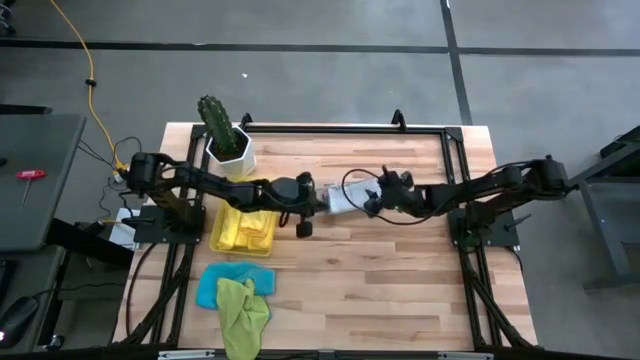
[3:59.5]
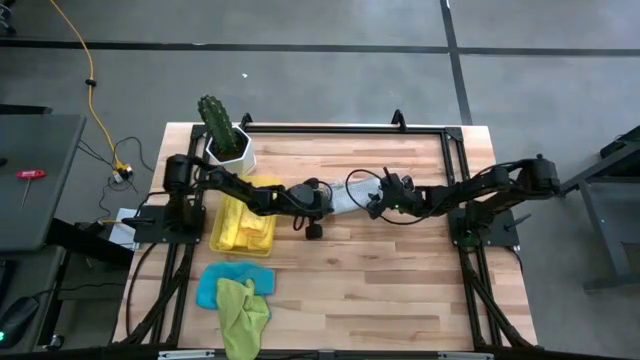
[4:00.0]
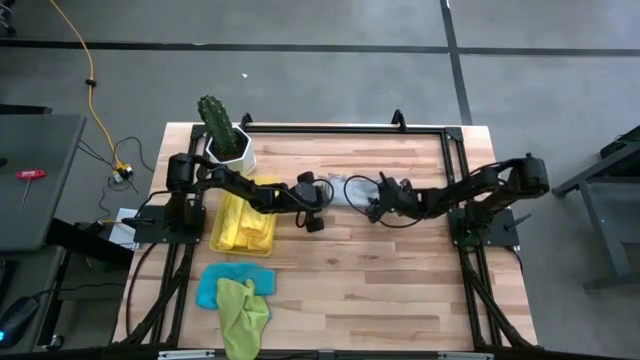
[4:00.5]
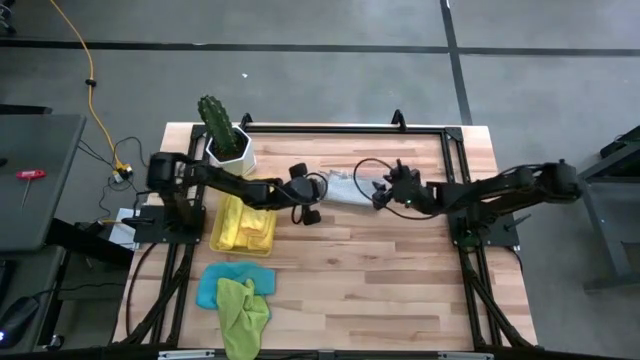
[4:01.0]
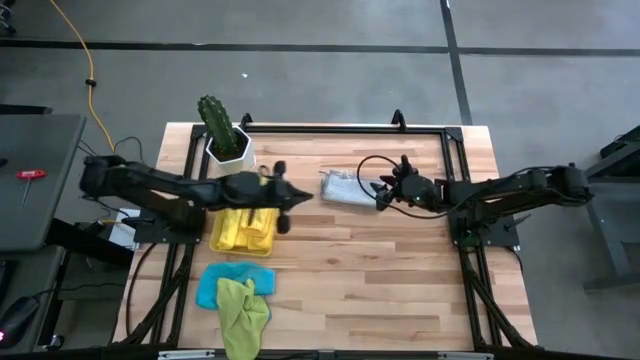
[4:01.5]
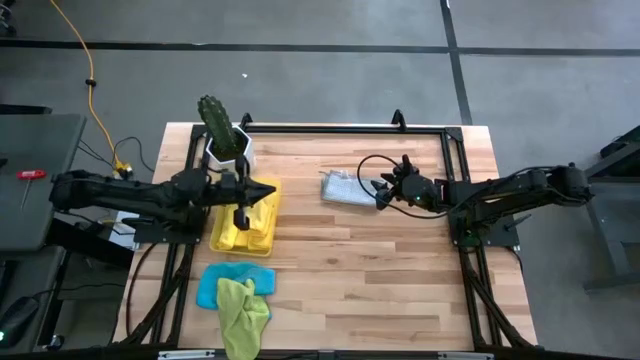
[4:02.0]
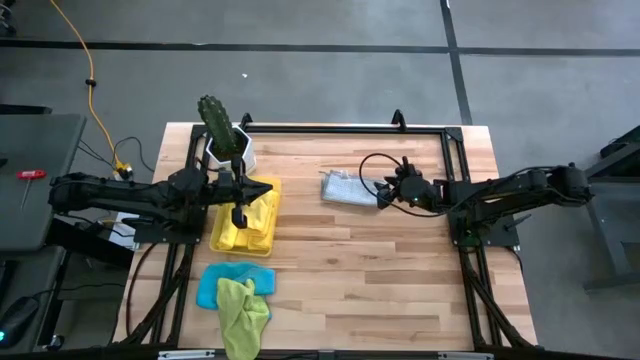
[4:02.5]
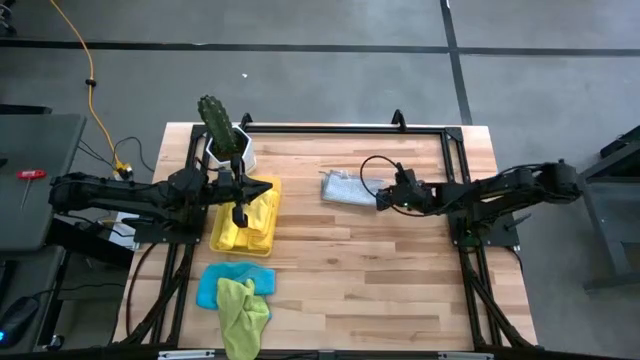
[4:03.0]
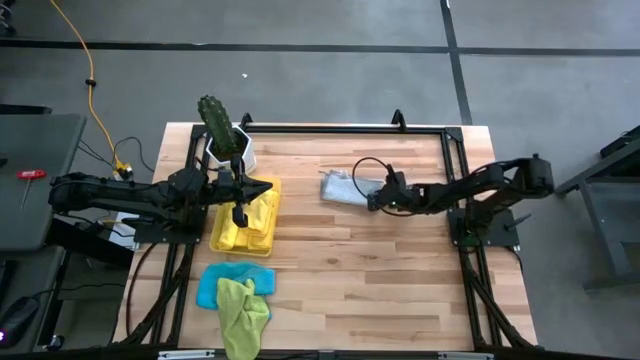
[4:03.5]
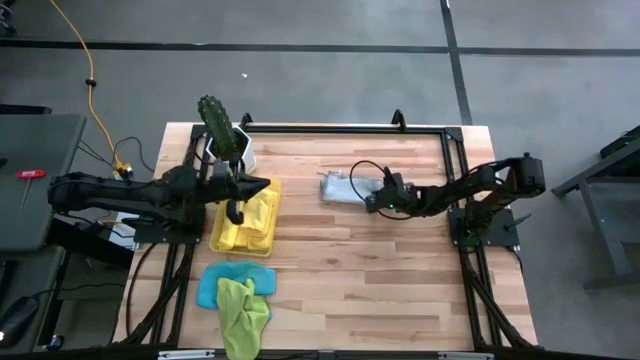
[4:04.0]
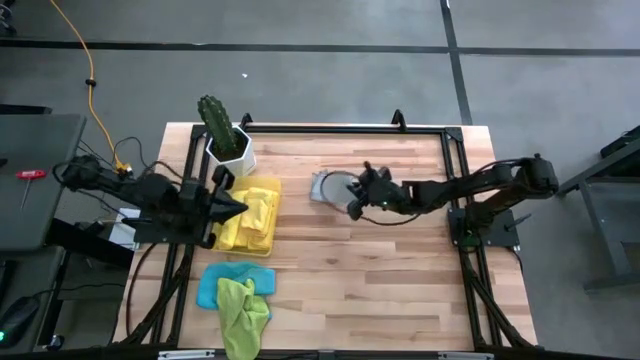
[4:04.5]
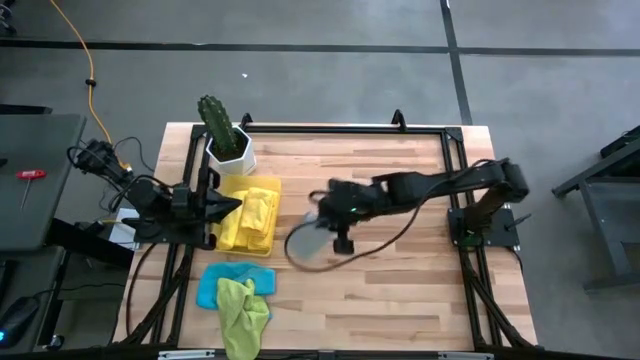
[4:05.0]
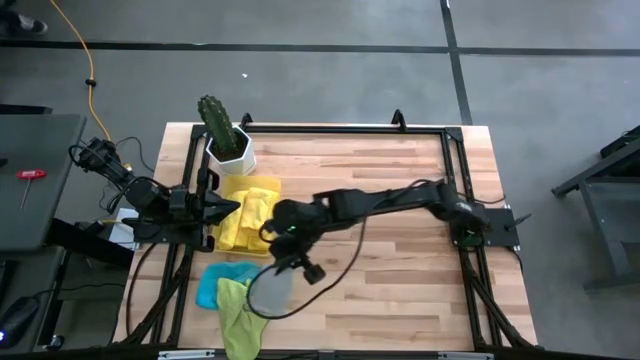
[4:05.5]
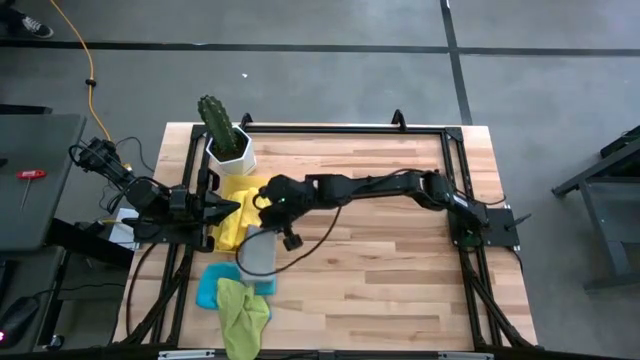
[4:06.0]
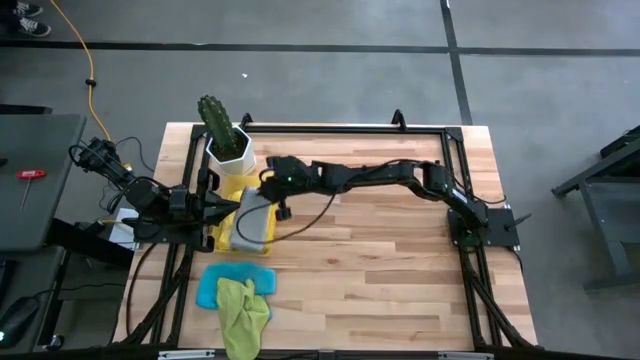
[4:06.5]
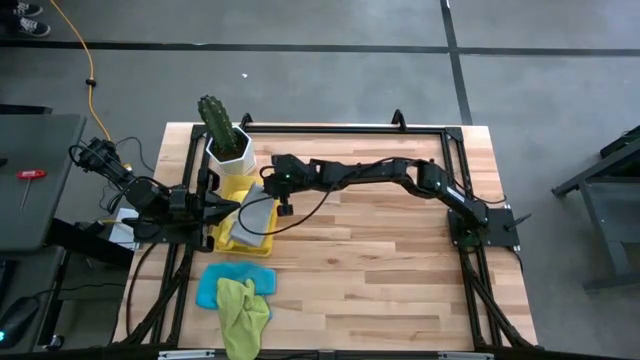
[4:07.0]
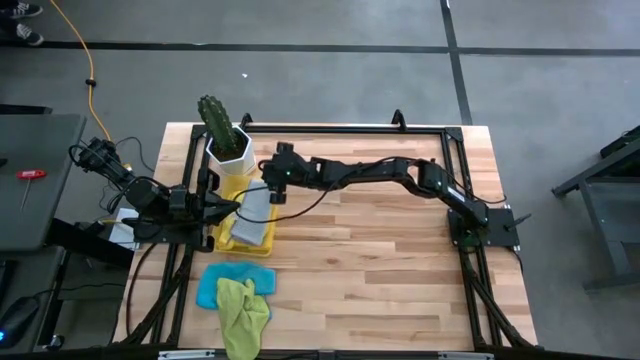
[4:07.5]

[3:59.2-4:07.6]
Task: Fold microfiber towels
Put the folded gray microfiber towel into the yellow bin

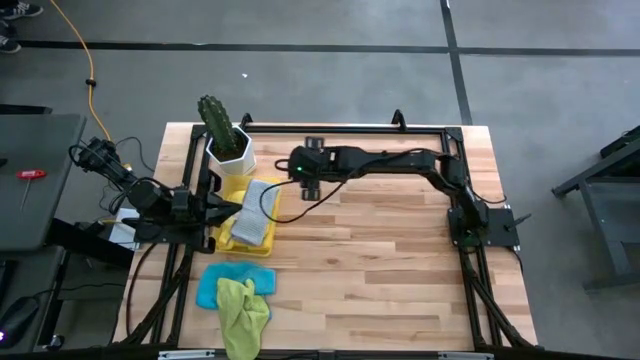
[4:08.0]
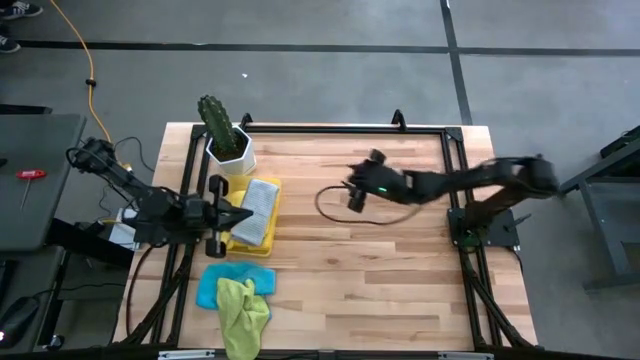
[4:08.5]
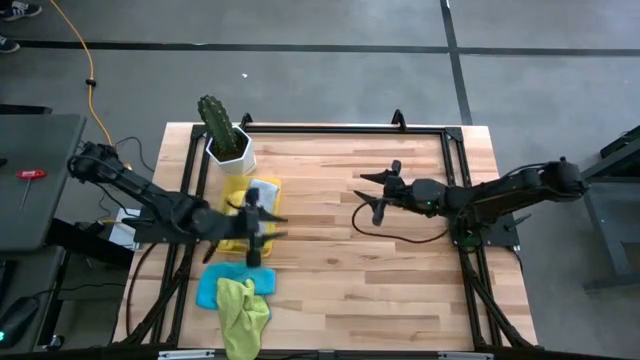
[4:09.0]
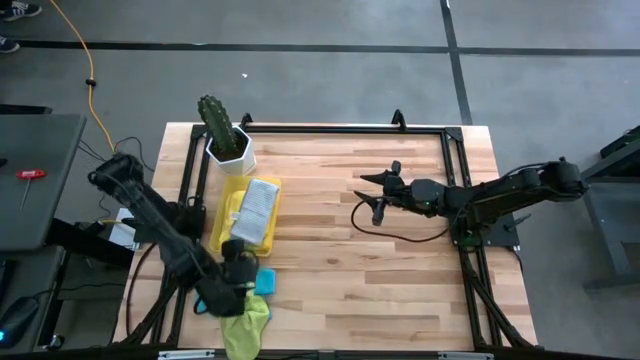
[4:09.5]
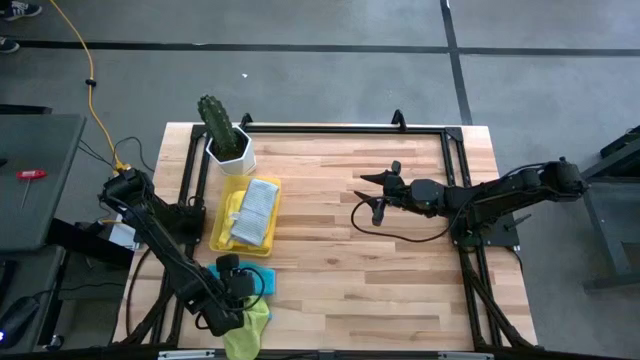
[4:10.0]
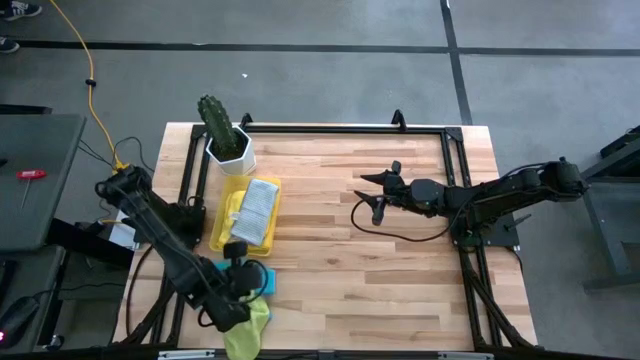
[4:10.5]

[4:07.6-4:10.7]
Fold the green microfiber towel

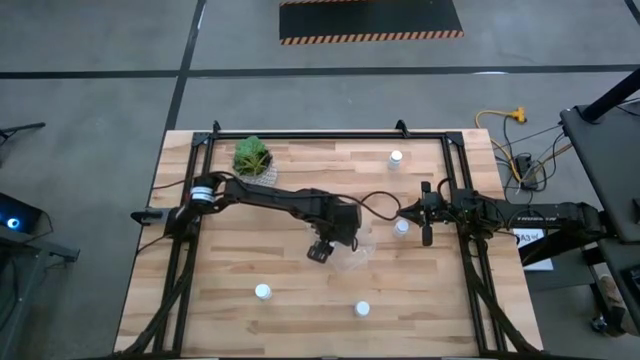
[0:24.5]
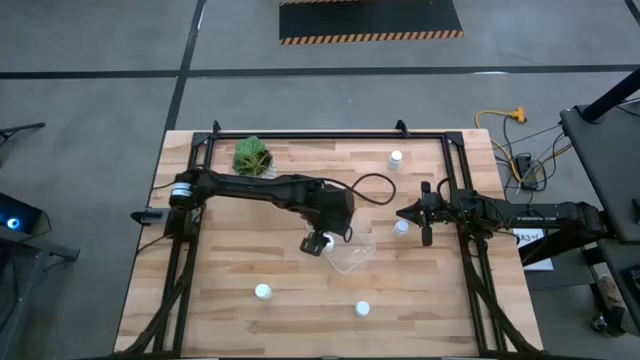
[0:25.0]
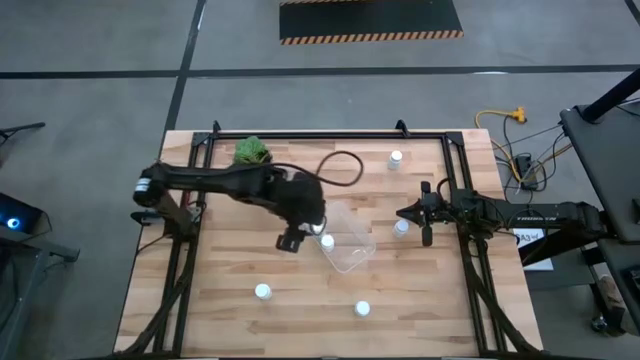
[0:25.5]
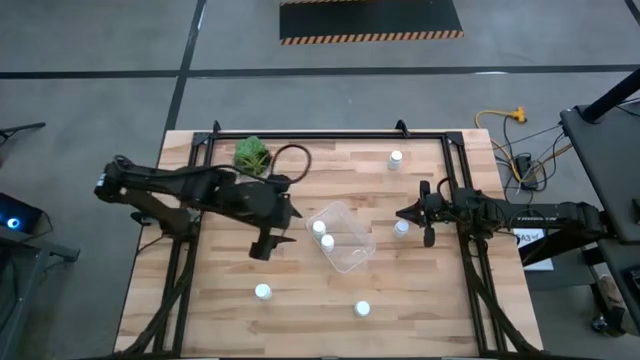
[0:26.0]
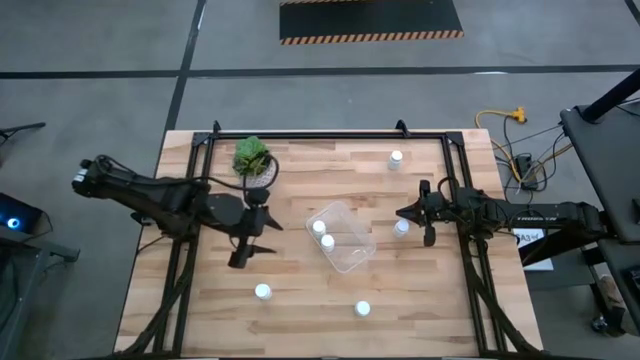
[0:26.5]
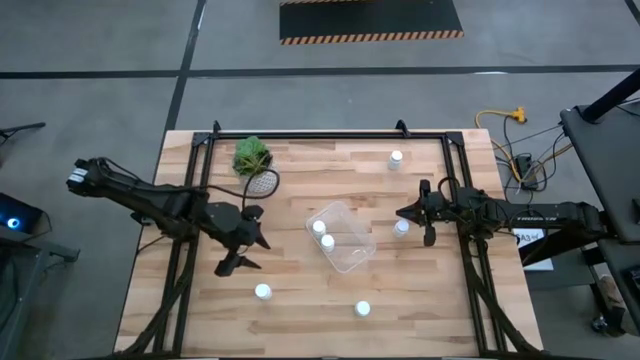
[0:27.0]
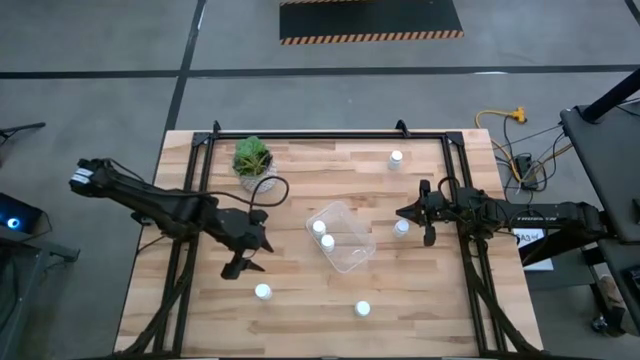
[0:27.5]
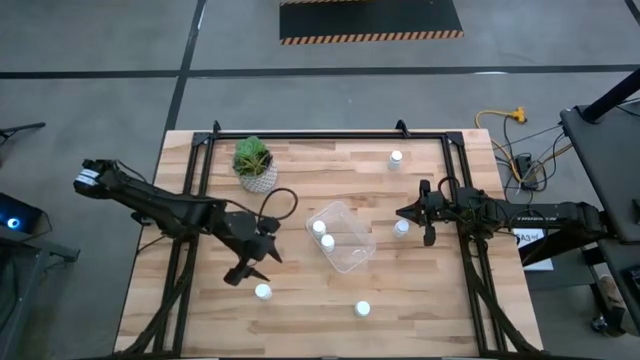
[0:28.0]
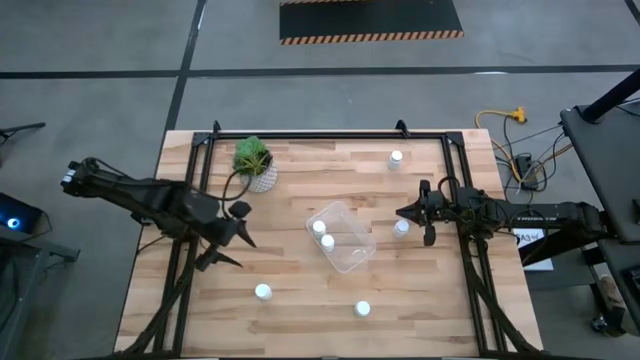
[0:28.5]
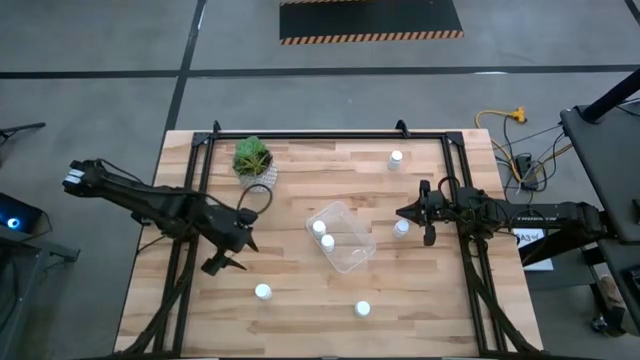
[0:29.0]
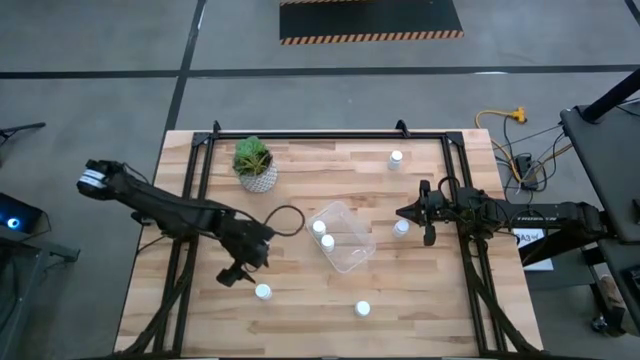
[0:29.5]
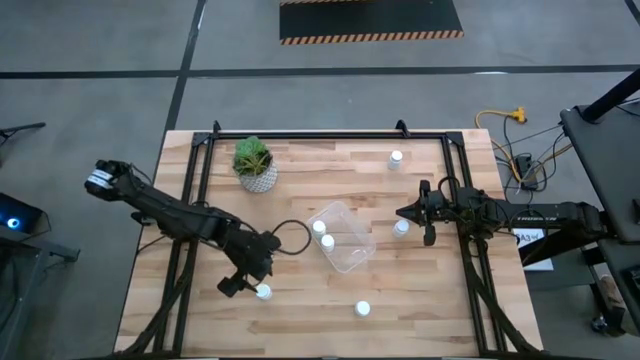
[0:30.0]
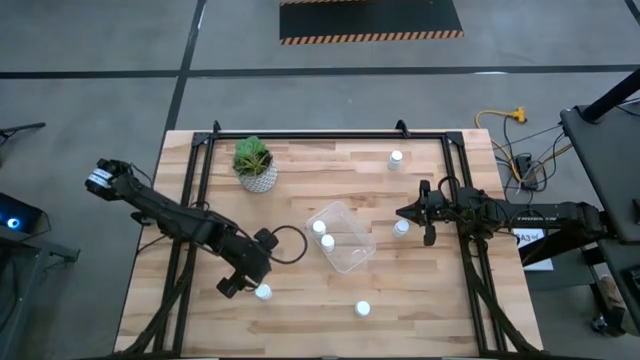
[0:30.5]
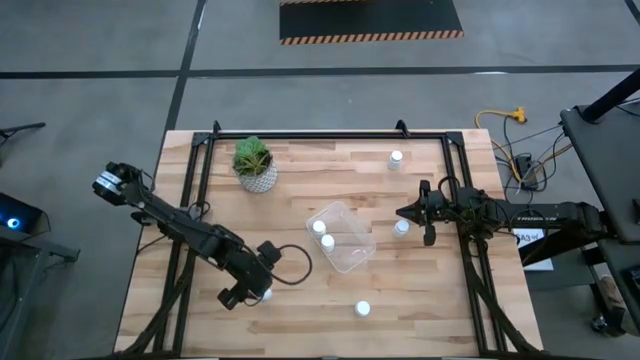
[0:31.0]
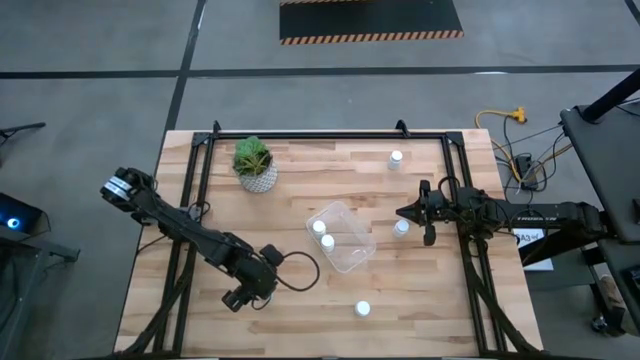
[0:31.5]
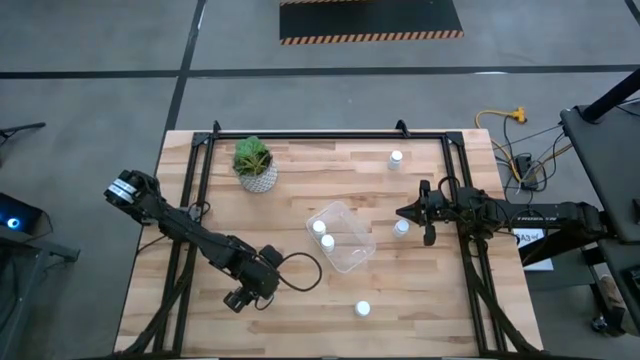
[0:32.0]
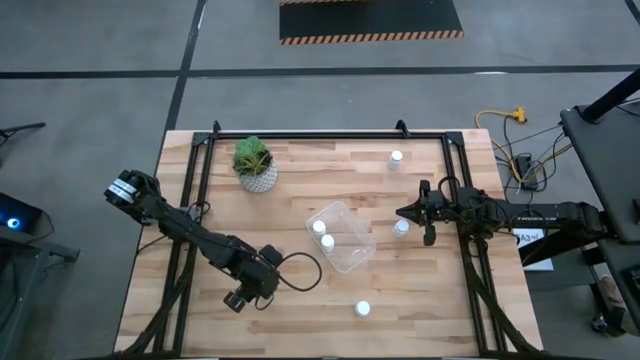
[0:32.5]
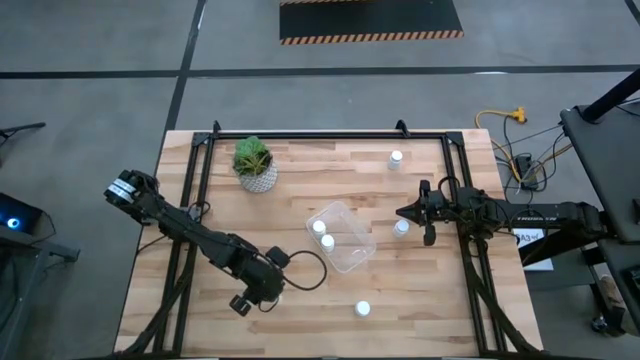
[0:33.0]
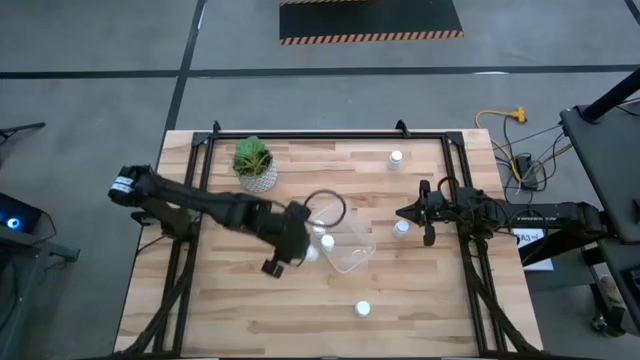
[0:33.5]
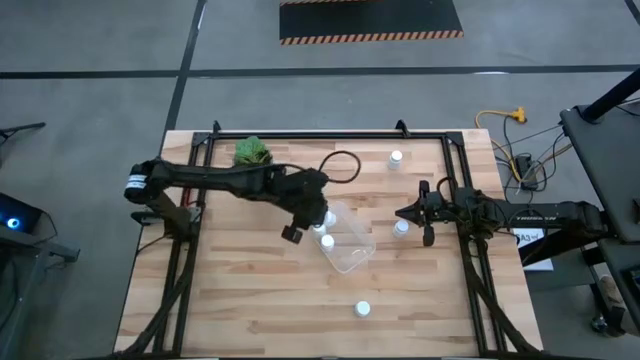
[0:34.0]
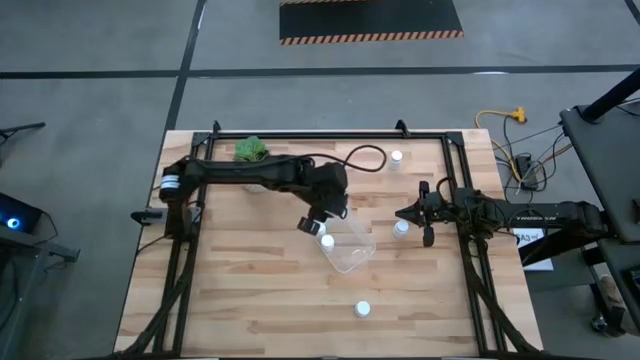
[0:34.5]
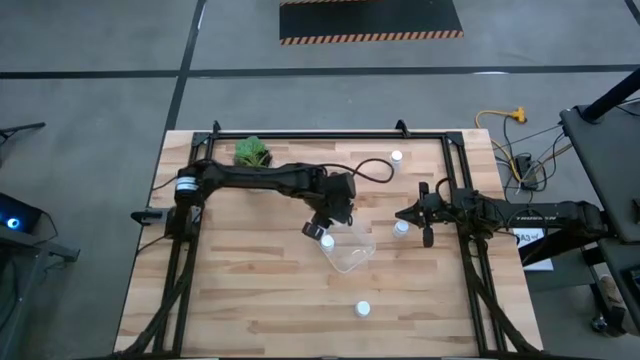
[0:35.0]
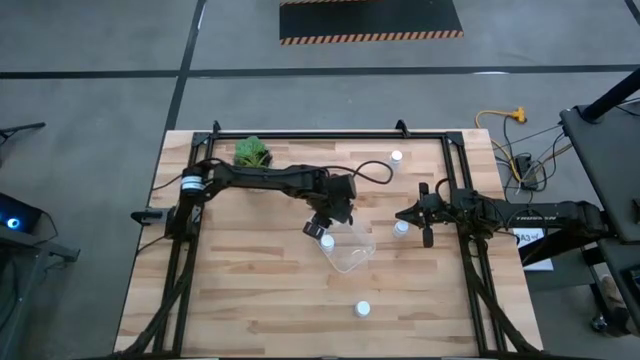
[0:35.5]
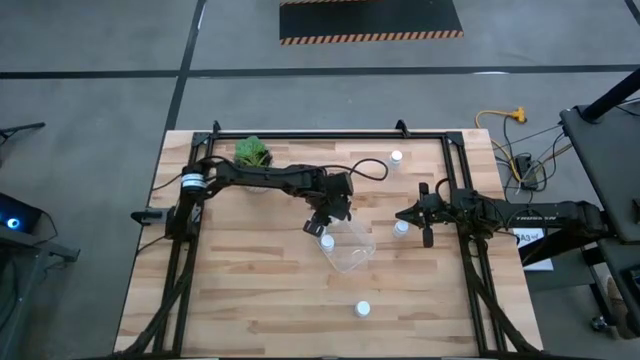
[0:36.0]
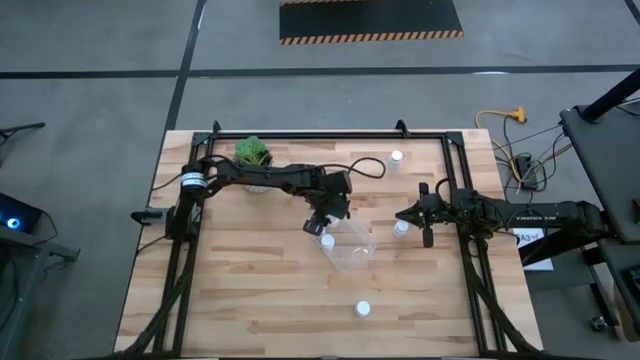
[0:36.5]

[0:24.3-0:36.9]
Task: Pick and place pill bottles into a basket
Put the white medicine bottle in the transparent bin
